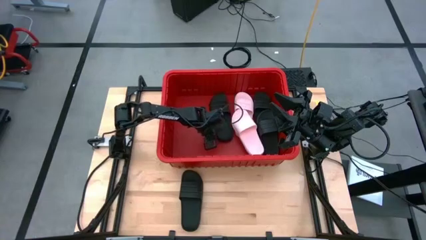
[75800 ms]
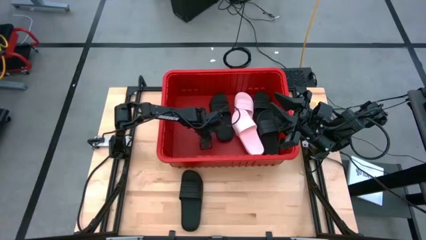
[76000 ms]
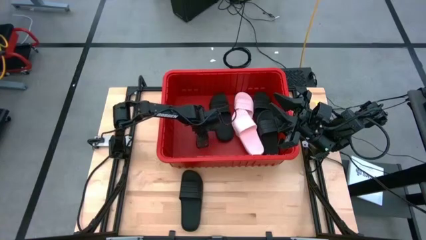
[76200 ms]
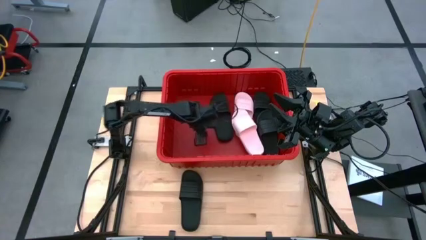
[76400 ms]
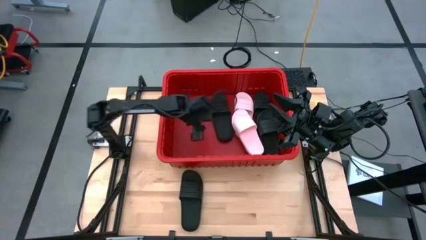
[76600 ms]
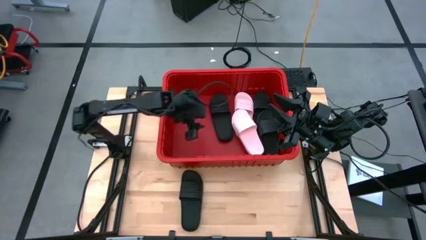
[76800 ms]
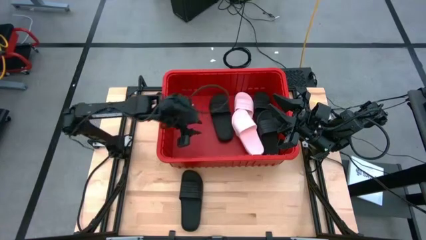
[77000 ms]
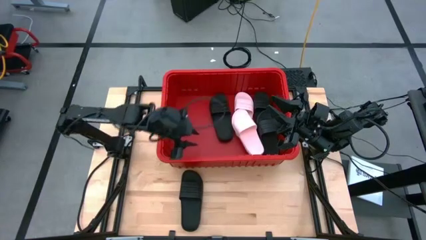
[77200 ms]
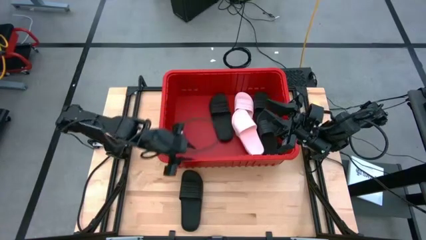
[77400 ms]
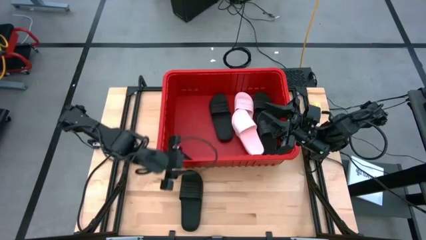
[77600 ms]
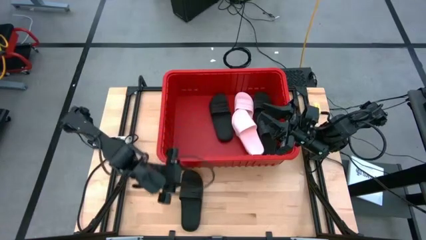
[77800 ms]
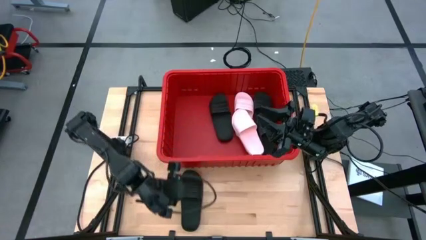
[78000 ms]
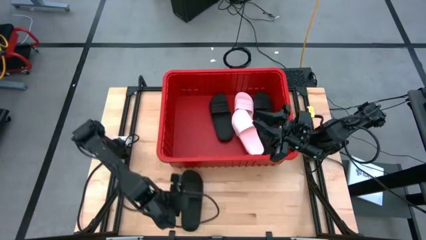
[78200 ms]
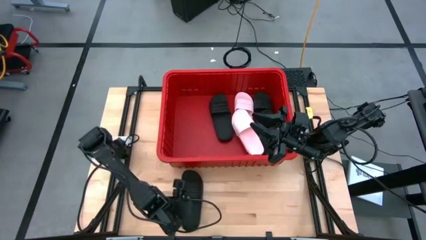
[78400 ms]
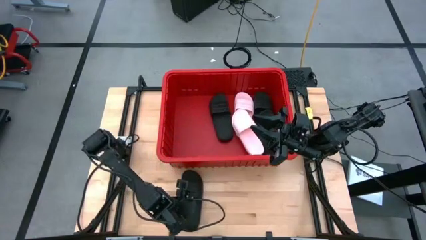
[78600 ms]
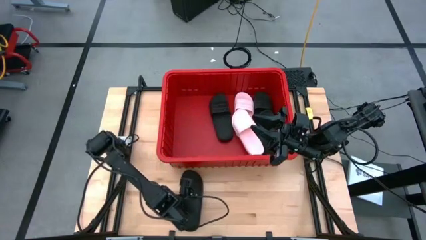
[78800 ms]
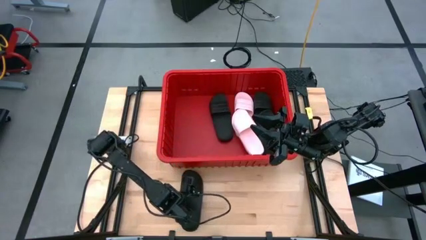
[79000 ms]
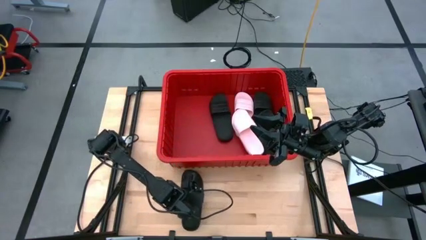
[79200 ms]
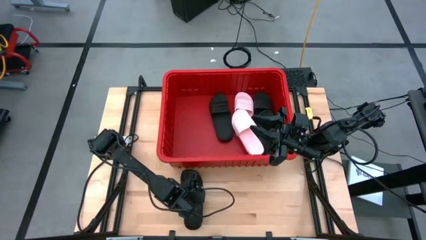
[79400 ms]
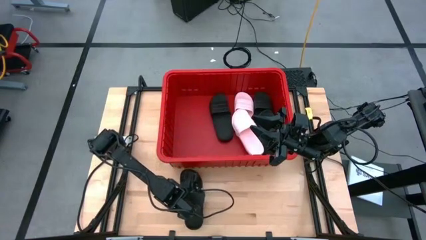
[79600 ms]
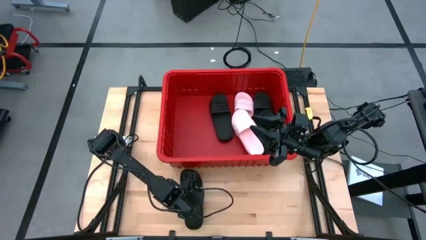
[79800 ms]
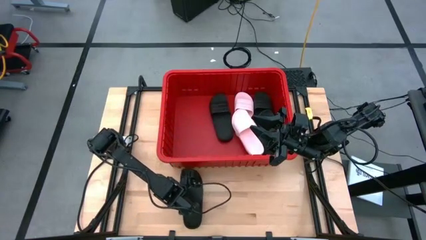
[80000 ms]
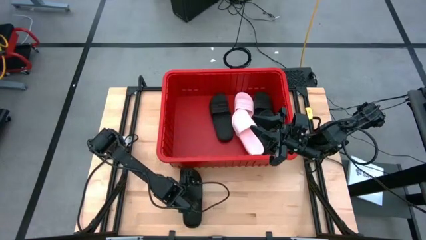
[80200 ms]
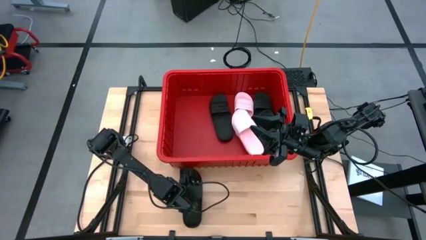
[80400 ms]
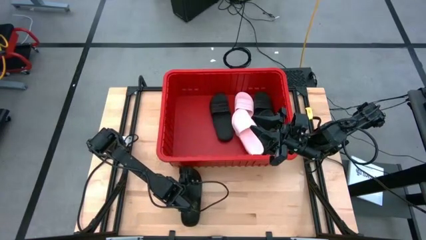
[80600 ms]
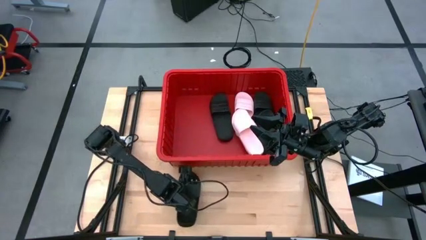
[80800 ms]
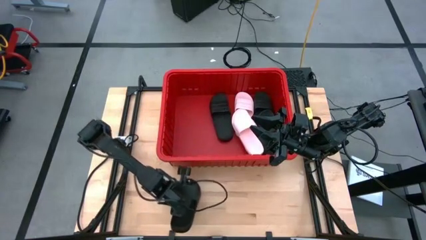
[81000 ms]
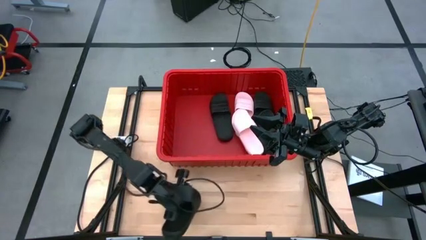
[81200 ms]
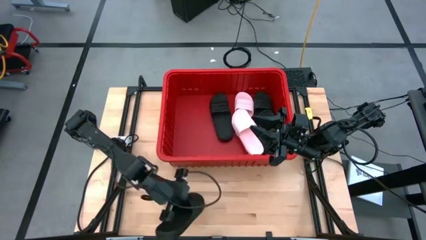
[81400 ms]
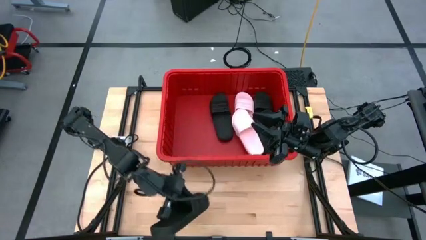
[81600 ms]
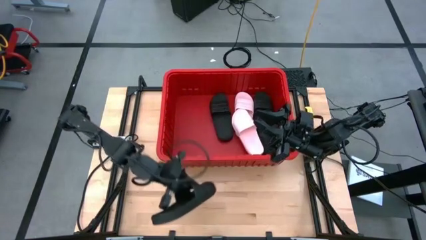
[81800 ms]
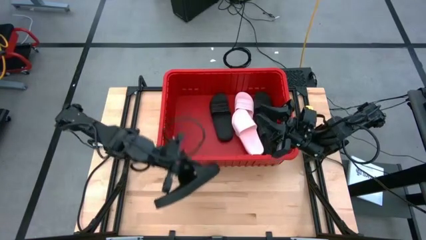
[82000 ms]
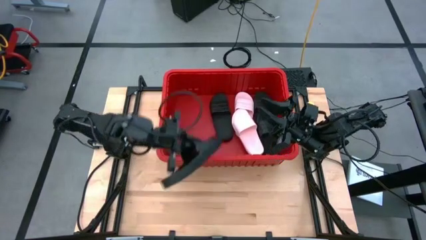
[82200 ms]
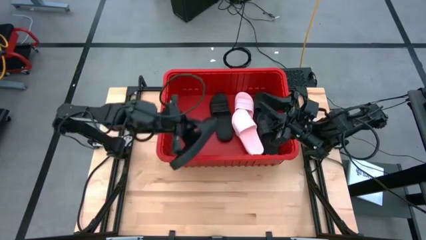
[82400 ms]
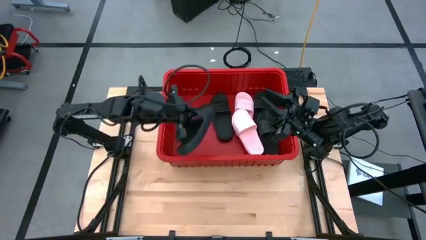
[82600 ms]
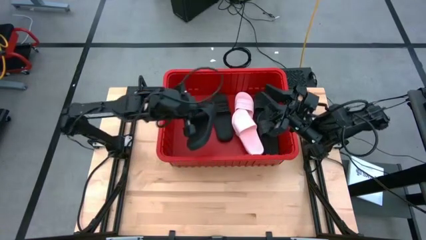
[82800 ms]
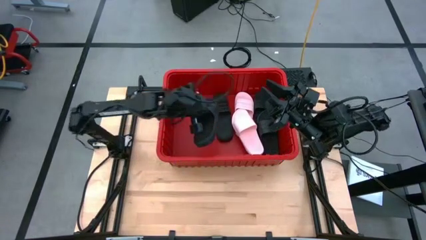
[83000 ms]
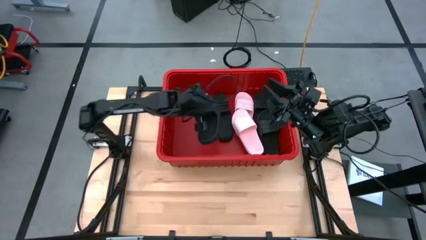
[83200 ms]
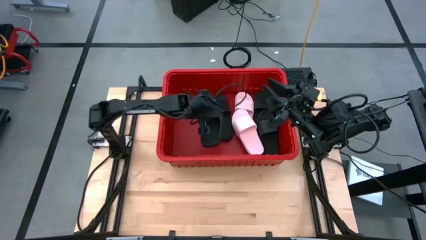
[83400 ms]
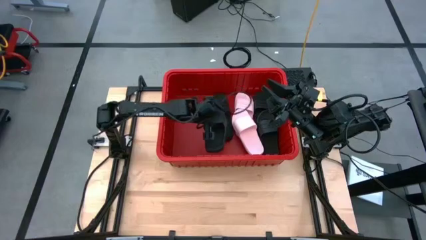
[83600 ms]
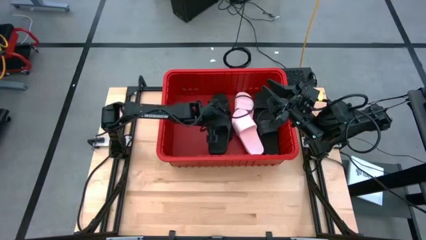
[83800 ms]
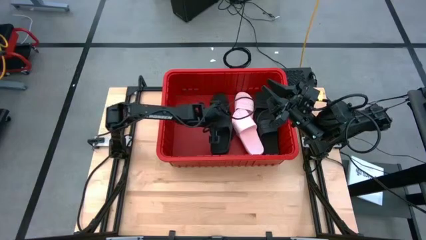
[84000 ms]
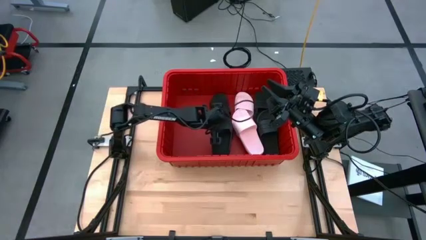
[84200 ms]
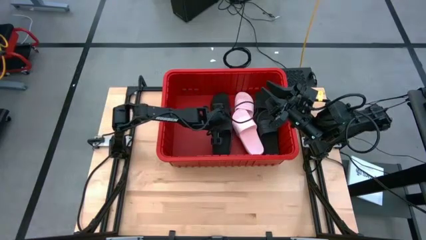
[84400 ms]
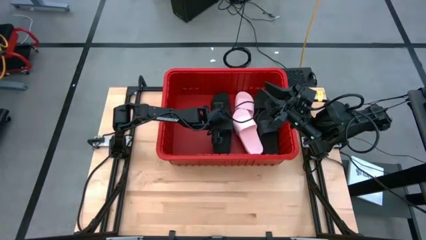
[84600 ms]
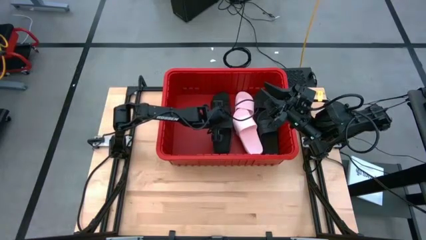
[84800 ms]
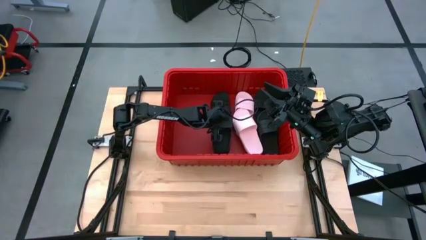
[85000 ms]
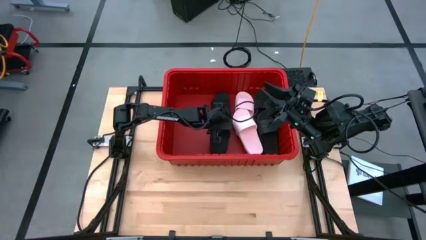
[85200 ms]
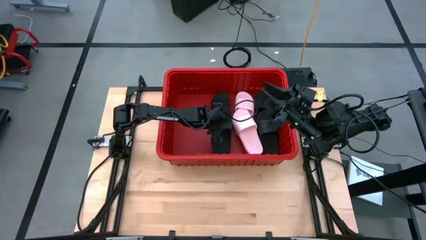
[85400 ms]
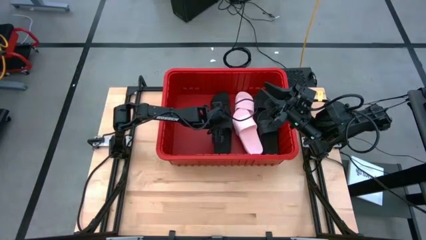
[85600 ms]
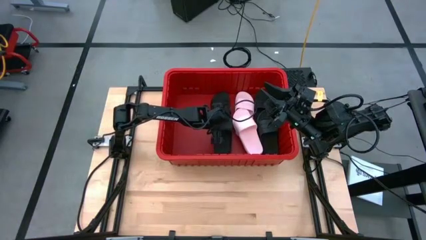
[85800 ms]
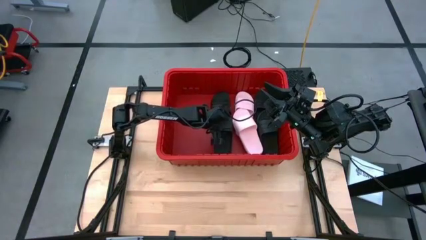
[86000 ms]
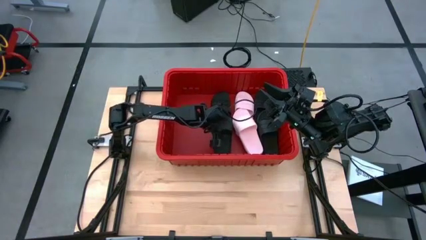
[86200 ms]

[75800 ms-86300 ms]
Task: Pick and place slides into bin
Put the black slide into the red bin

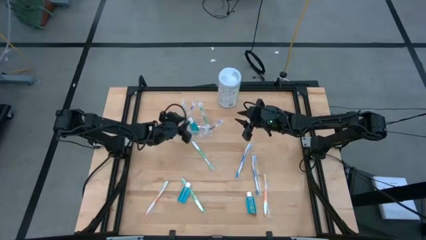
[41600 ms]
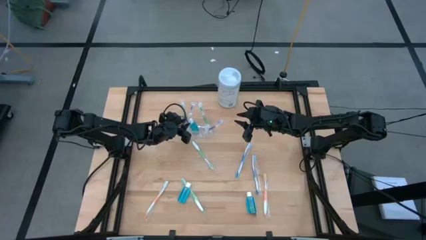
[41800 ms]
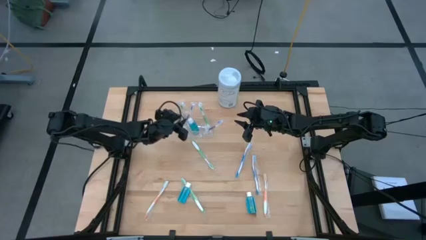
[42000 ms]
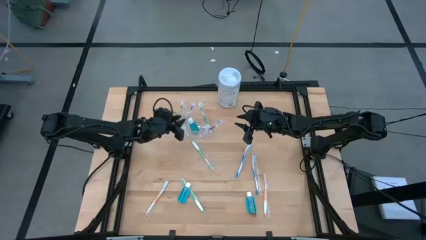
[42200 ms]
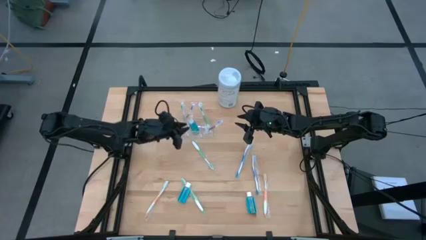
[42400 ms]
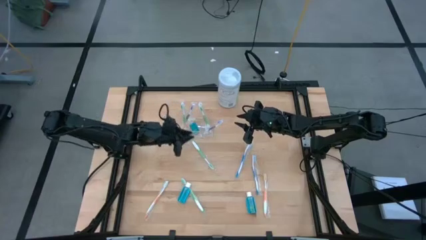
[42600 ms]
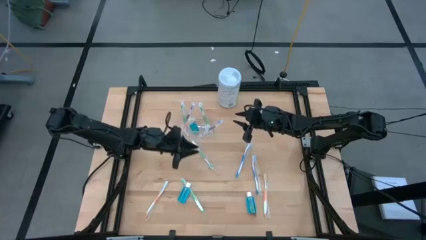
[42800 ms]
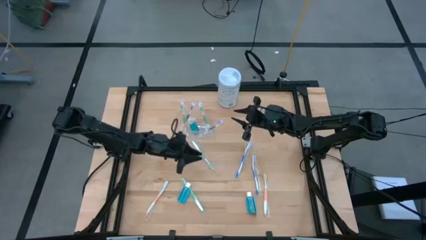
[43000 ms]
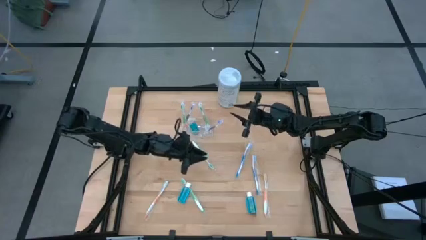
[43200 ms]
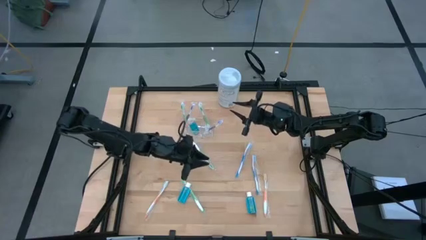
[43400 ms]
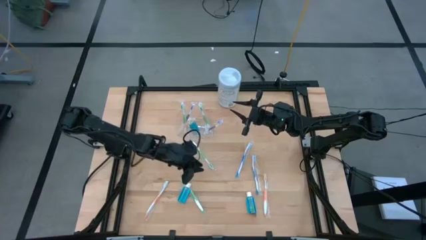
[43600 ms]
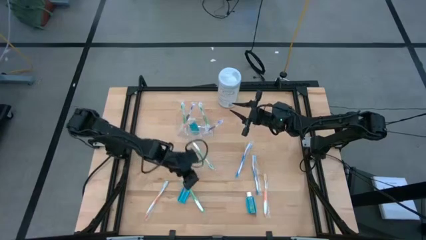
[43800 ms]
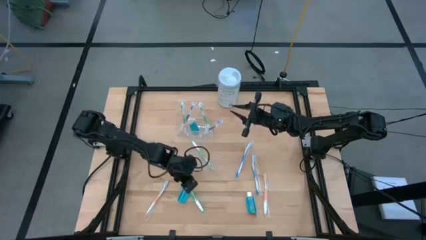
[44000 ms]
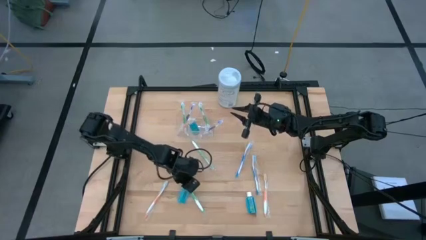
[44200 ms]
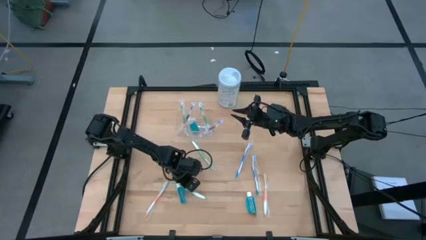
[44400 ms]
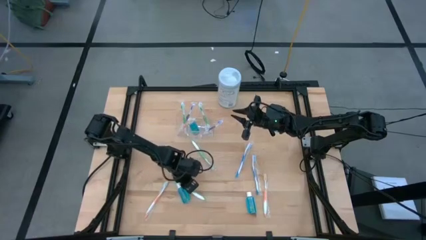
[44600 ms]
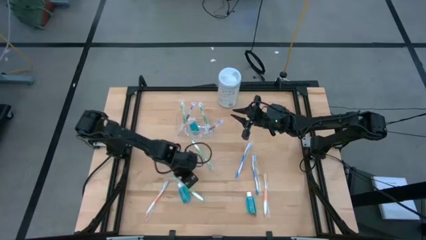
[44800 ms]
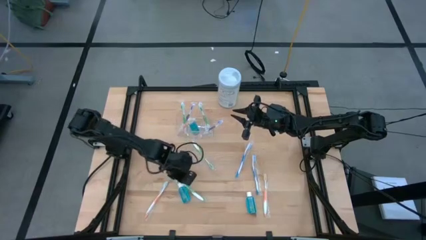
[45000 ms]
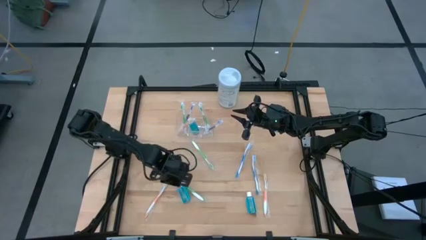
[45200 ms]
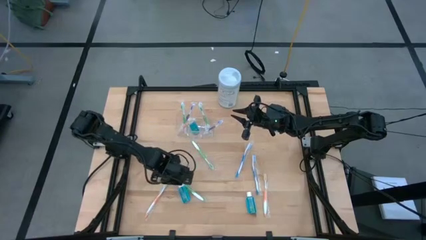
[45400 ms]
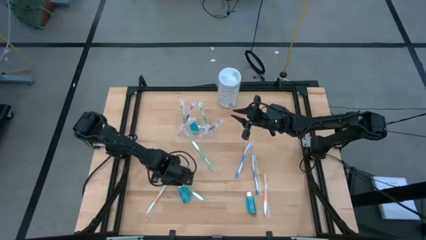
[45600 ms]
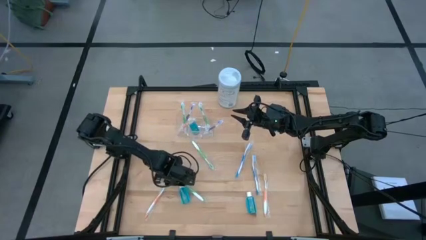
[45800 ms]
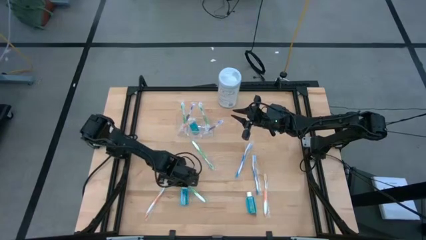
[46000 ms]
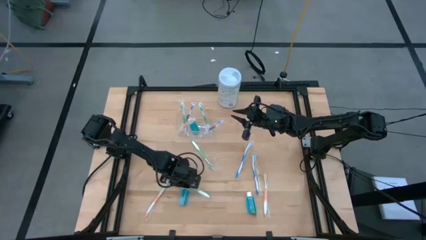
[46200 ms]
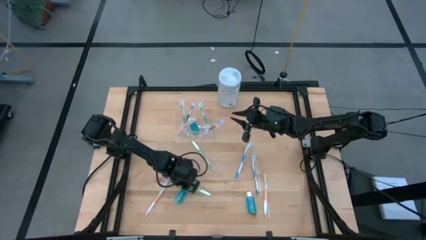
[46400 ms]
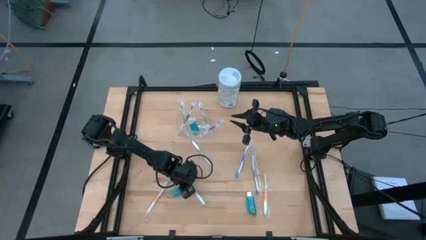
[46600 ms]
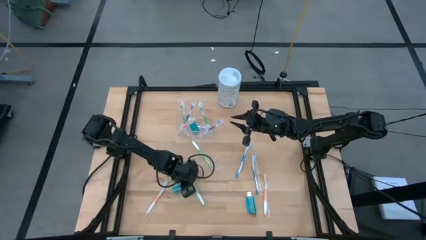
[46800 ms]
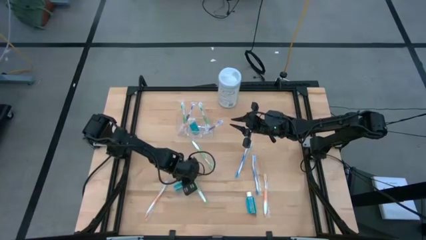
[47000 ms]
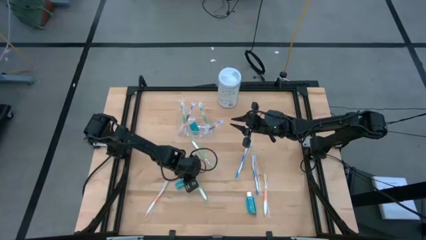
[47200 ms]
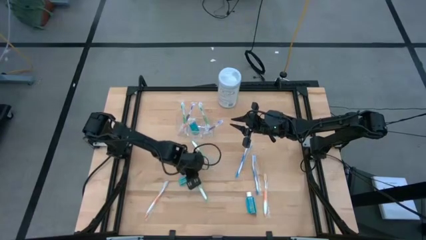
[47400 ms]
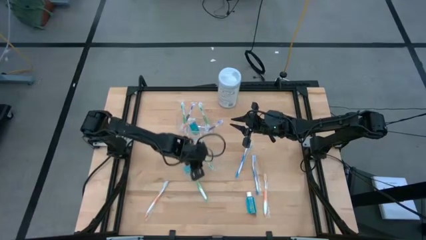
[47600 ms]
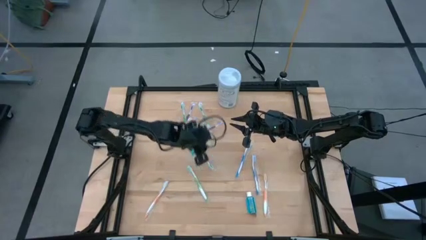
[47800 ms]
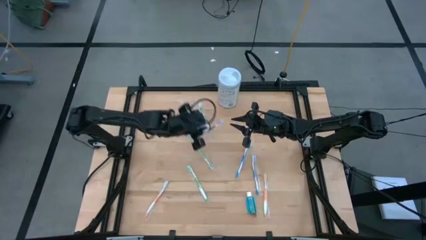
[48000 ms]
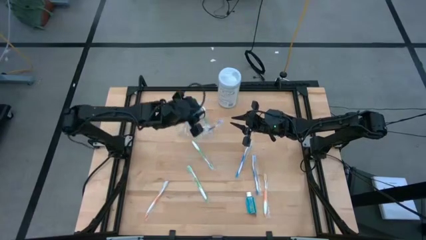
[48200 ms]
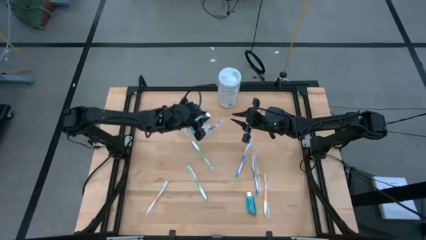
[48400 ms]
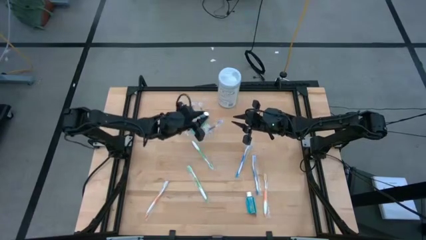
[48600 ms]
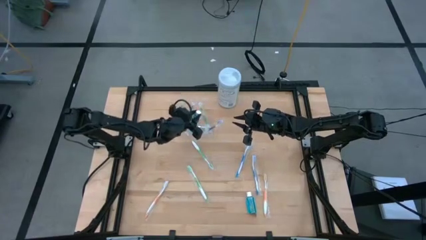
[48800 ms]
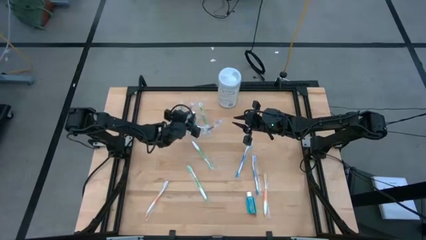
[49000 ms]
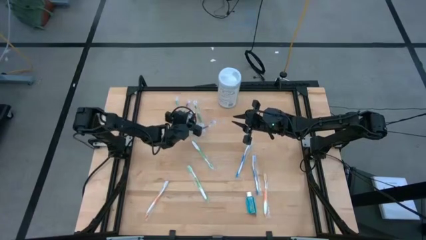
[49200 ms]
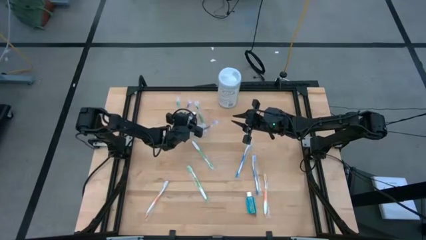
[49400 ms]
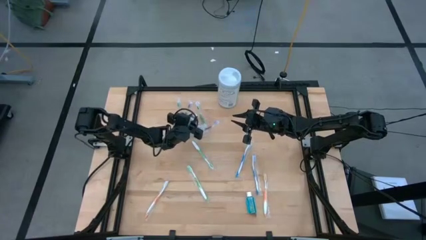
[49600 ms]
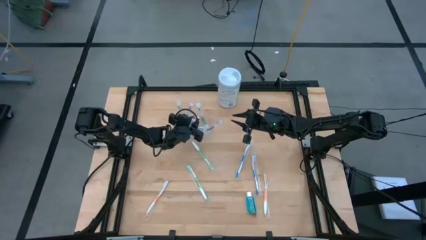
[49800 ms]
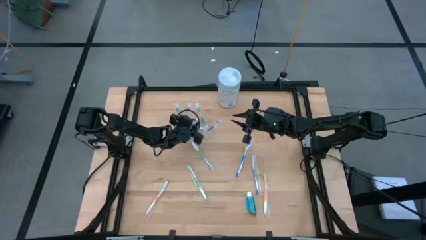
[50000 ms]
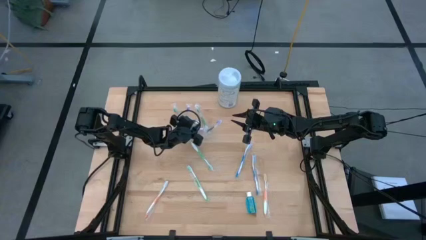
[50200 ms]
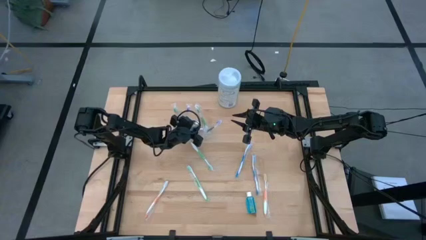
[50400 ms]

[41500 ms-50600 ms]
Task: Pick & Place toothbrushing station
Put the blue mouthwash into the transparent organizer
